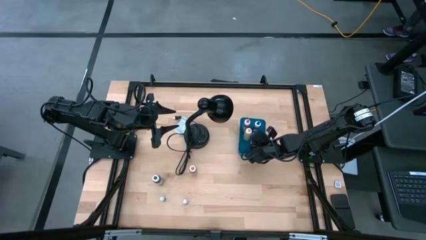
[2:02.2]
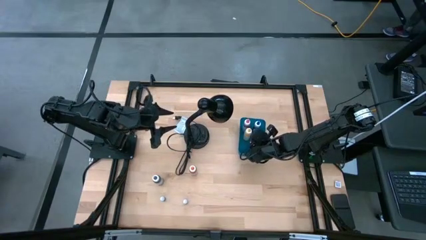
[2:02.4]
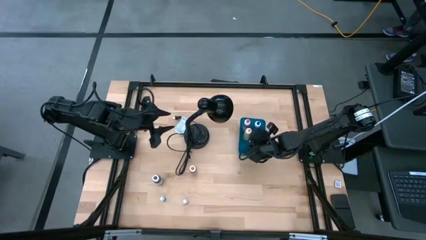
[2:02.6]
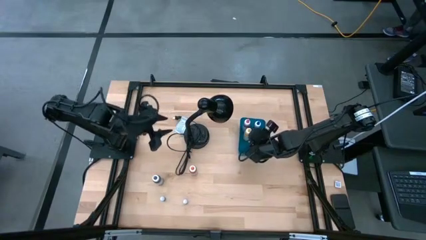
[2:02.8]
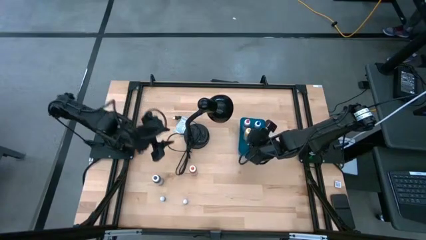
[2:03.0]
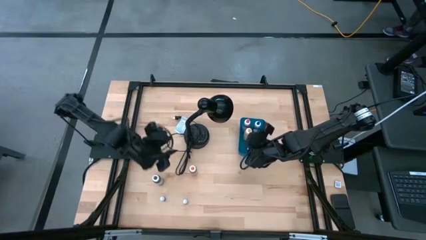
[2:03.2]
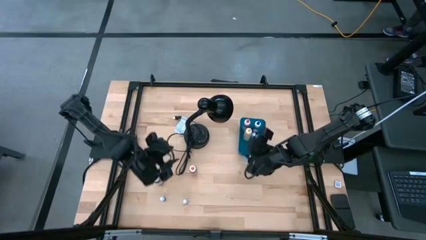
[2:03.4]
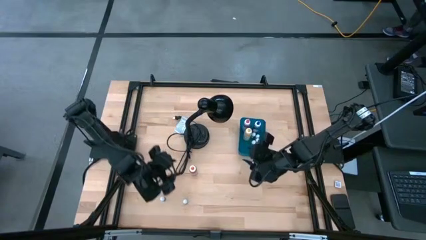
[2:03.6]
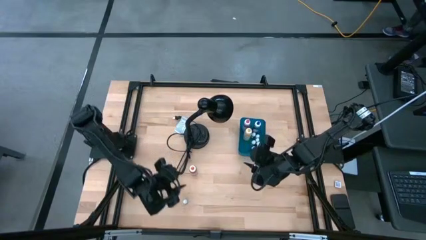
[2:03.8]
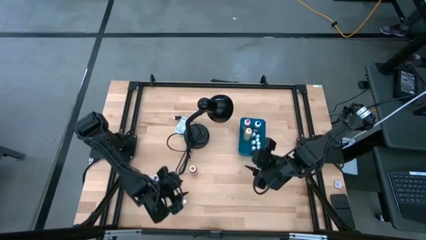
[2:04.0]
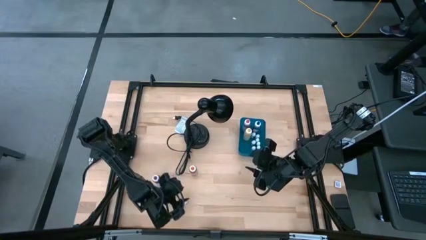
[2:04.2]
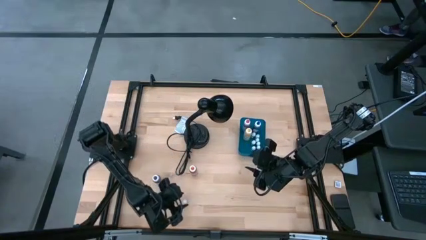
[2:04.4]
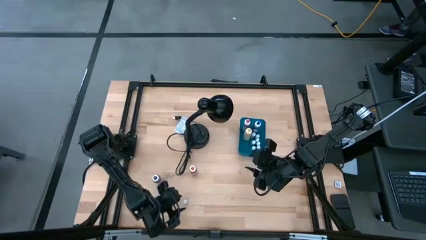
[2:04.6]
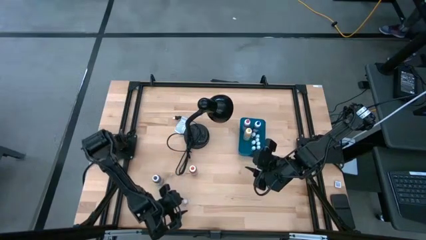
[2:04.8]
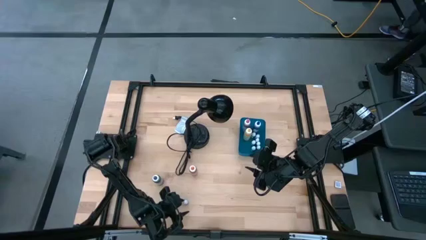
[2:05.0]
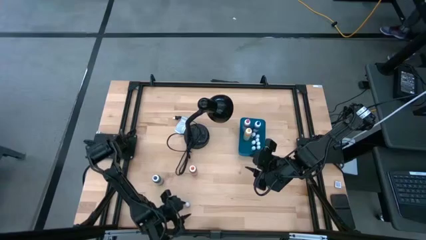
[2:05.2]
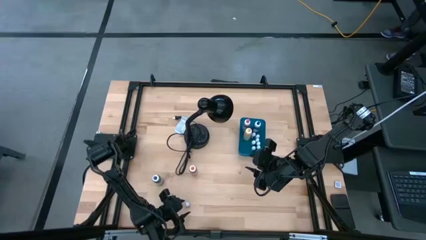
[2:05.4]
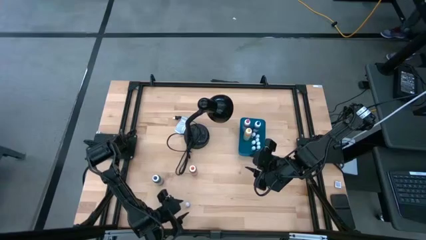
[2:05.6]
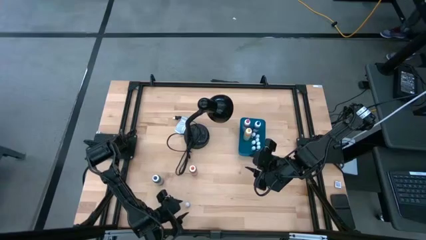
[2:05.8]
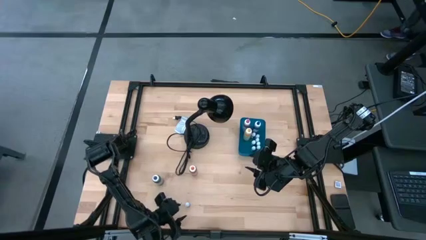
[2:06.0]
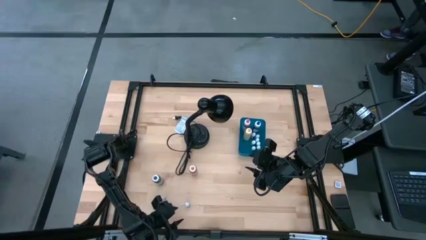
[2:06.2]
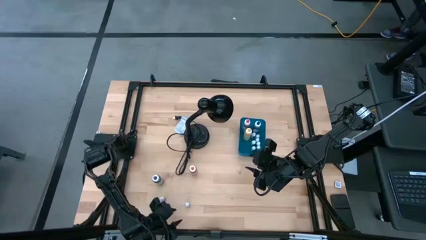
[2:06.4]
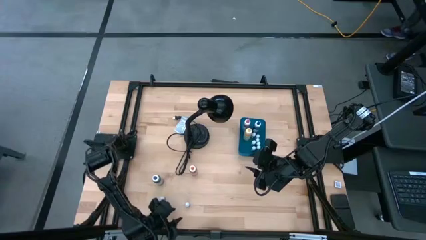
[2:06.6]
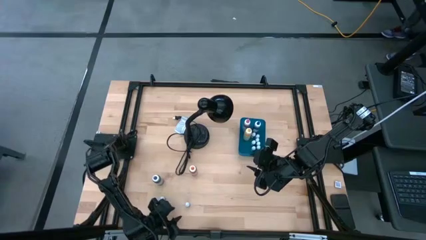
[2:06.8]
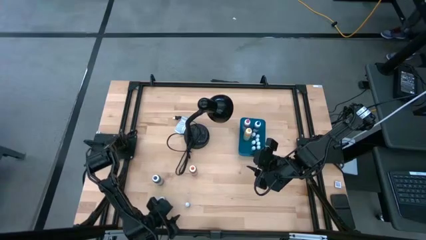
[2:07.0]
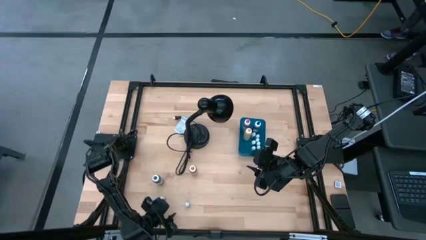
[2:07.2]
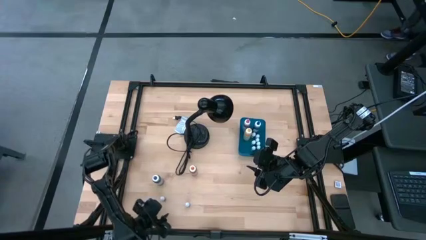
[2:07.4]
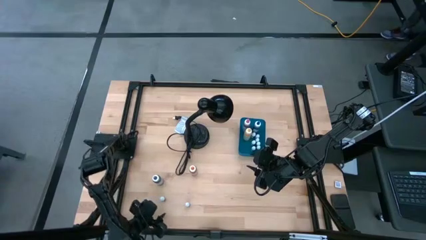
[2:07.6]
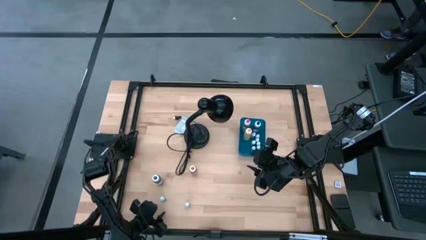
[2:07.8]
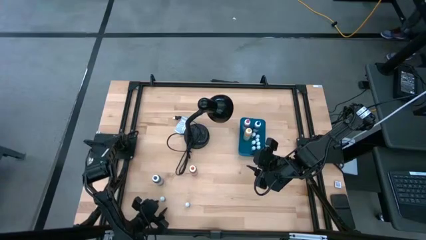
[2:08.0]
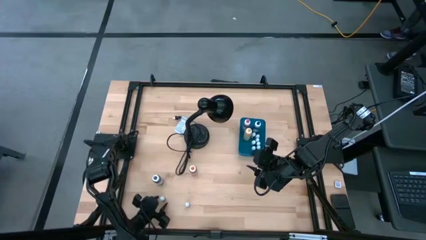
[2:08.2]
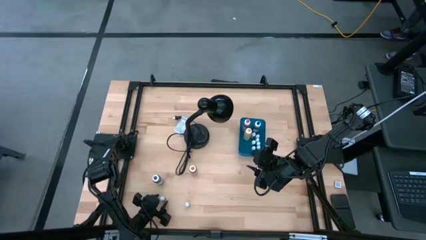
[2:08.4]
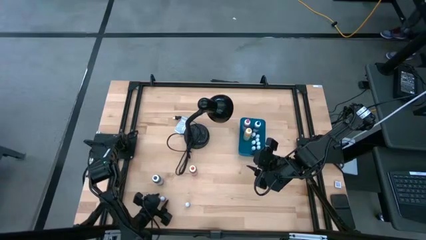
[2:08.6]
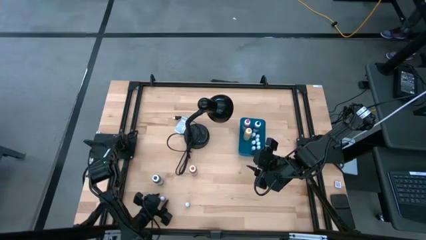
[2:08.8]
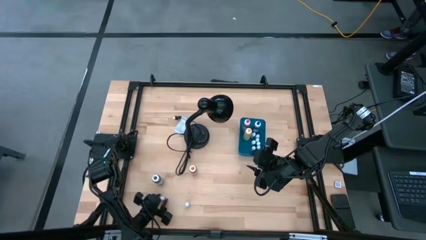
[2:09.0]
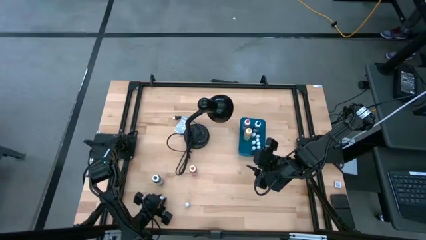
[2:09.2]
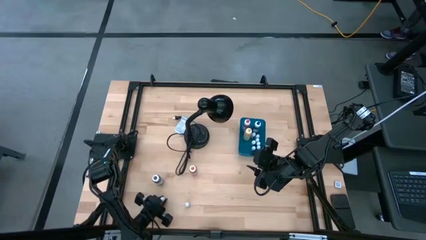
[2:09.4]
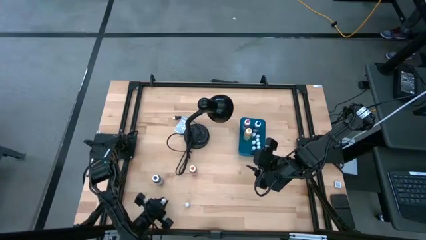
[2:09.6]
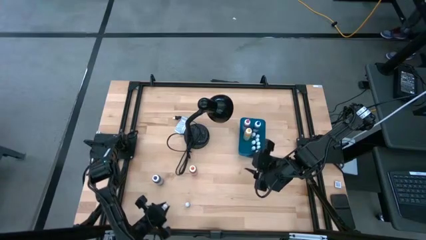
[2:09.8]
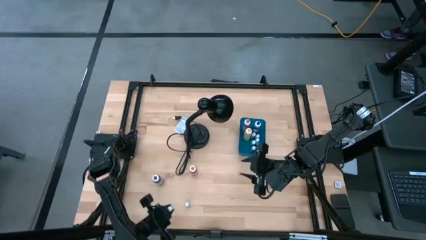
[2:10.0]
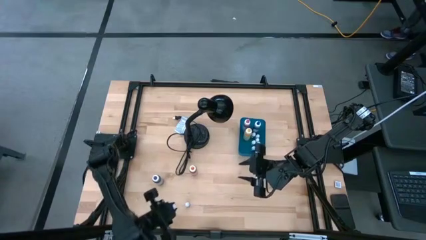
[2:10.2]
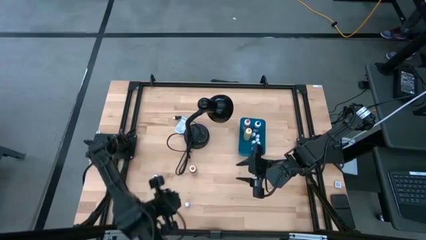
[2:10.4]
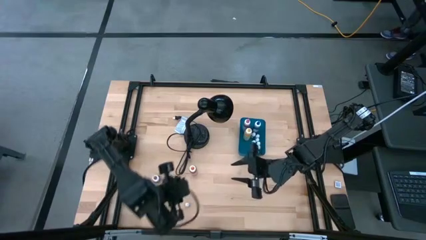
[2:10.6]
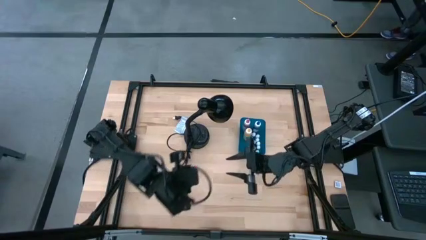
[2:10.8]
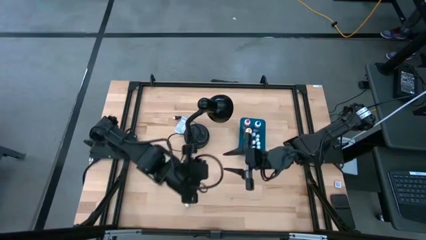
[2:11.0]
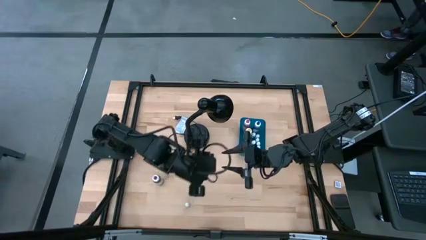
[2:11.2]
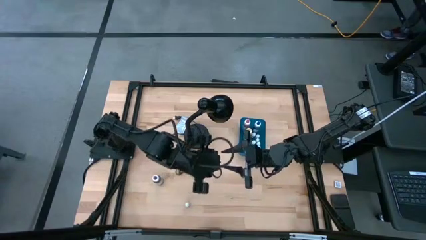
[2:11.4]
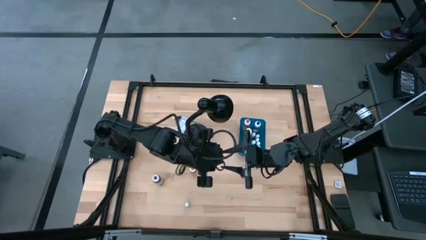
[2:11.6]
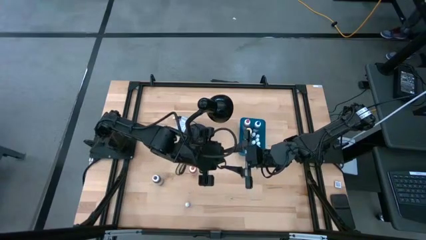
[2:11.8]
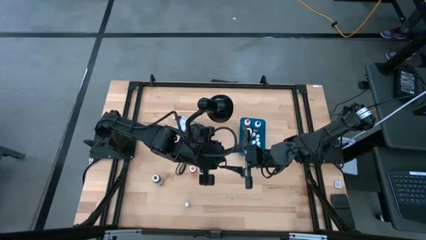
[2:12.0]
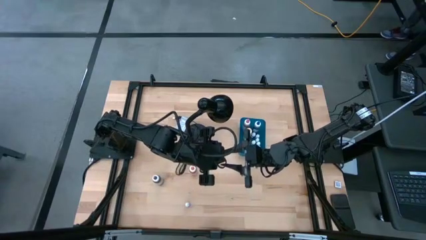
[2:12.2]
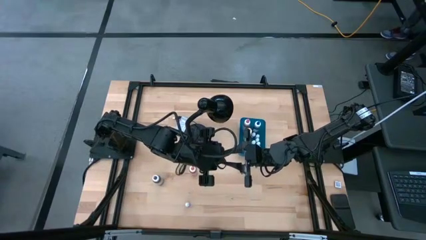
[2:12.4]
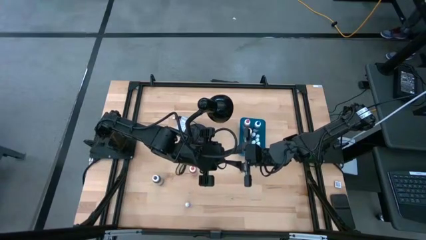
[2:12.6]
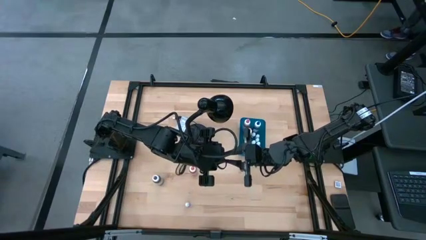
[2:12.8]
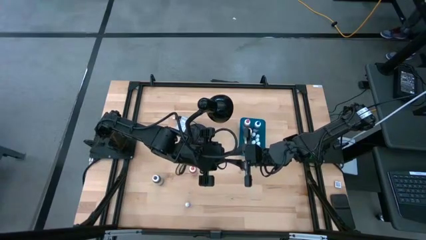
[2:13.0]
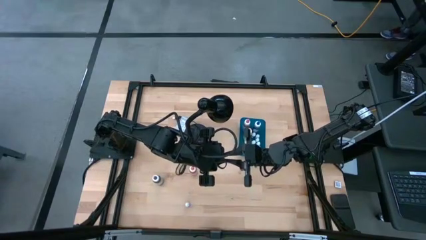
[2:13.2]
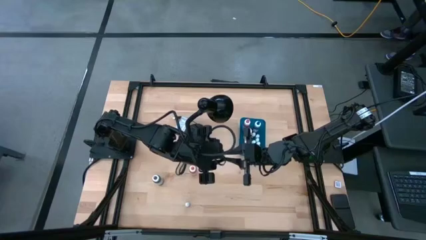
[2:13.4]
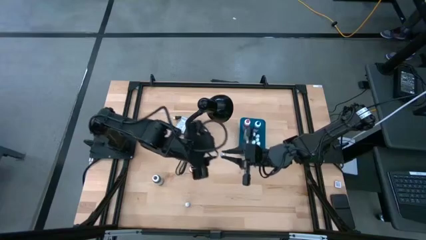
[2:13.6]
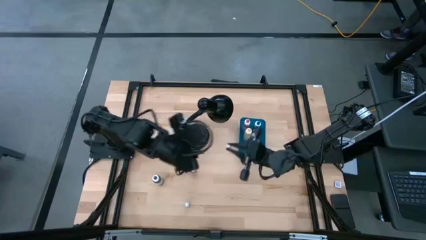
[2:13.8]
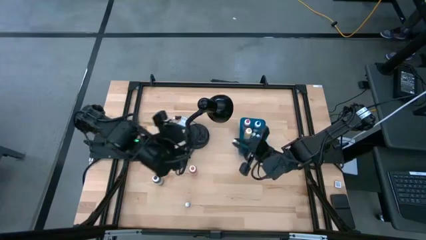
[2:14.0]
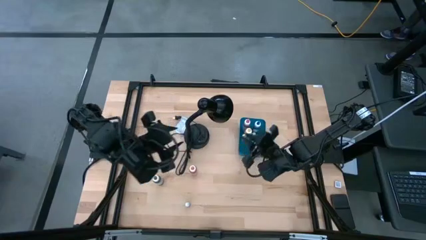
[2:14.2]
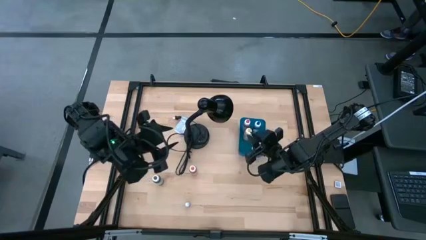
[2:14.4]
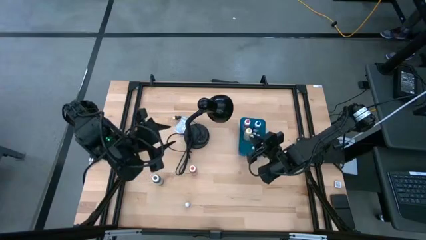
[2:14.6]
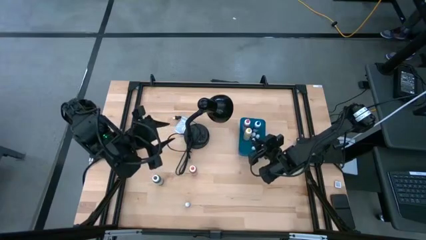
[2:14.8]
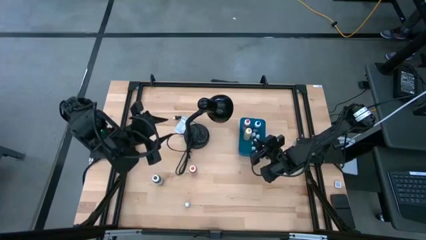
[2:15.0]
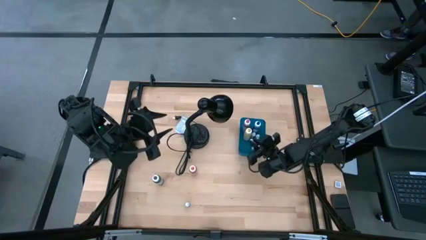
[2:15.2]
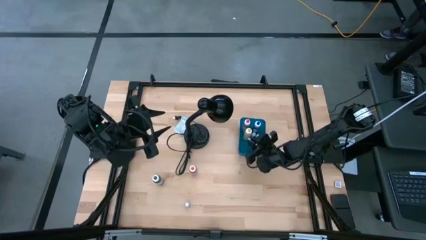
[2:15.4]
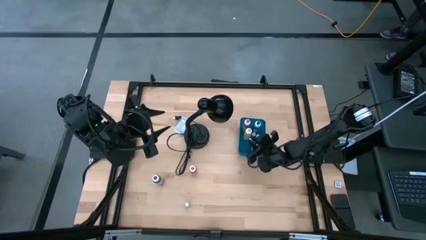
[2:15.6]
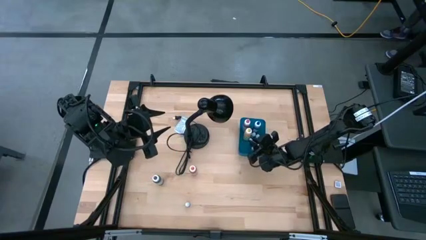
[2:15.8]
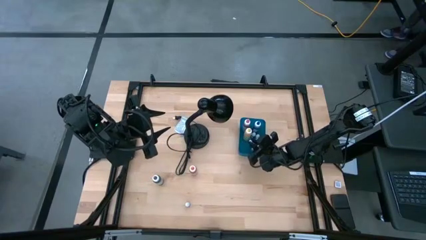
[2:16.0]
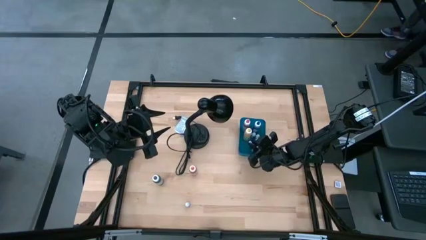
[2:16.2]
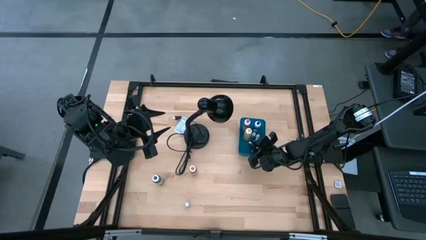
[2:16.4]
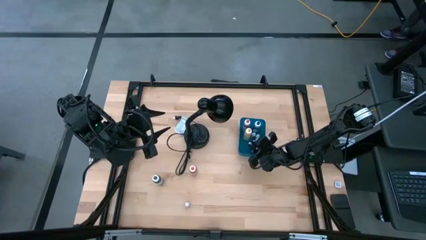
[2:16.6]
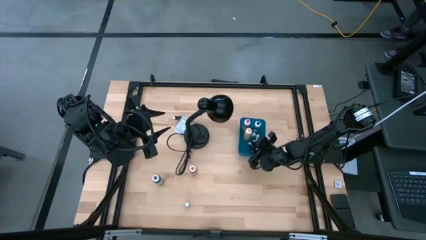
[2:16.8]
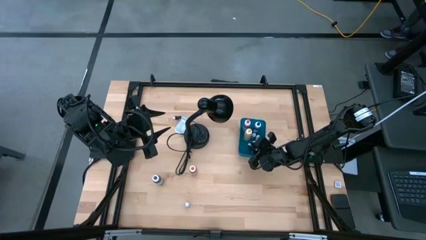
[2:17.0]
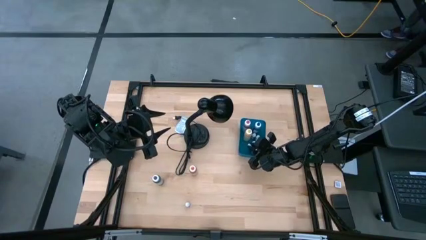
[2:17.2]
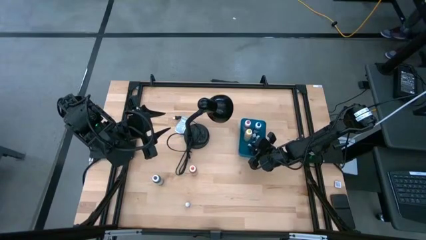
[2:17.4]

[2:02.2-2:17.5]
Task: Pick & Place food coloring
Put the small orange food coloring bottle into the blue bin
